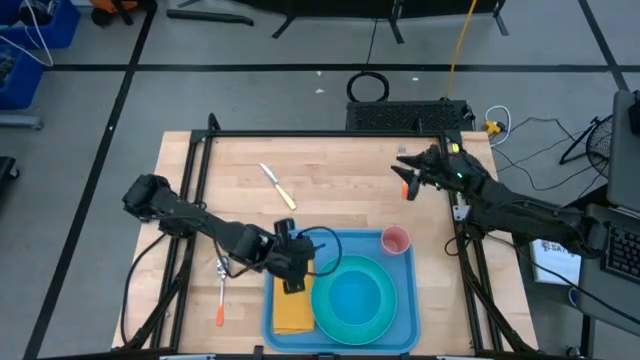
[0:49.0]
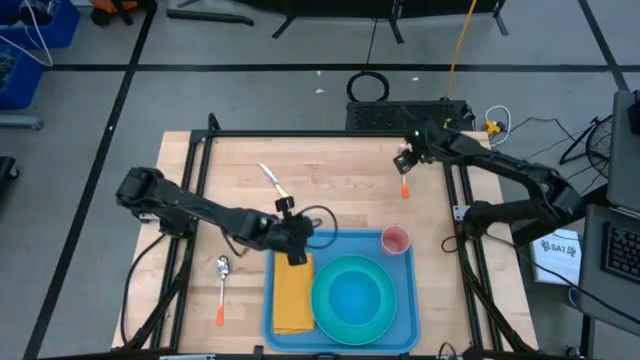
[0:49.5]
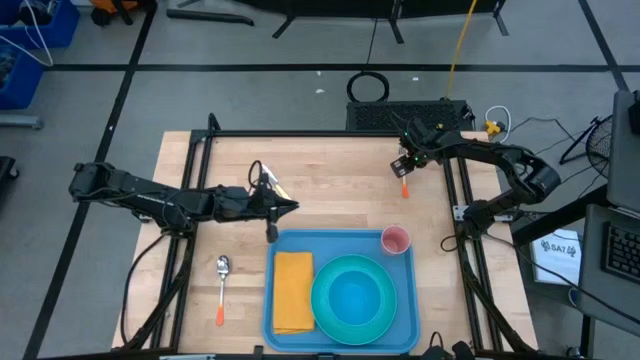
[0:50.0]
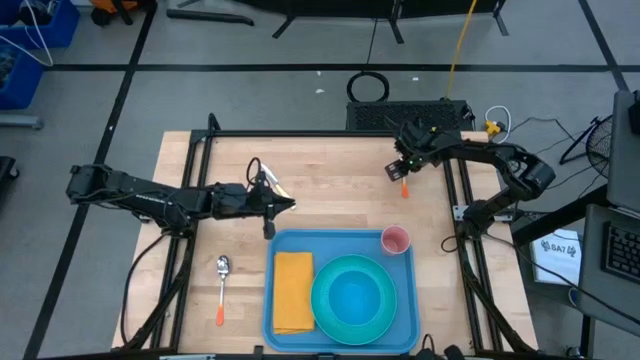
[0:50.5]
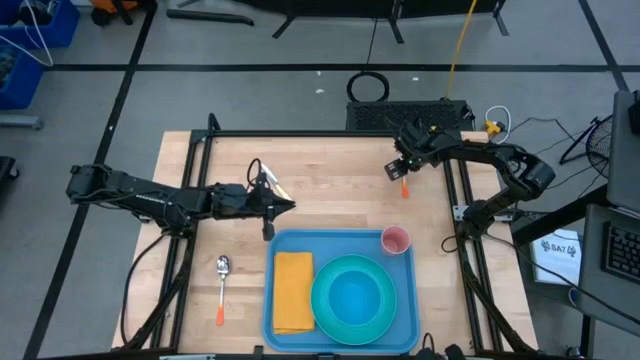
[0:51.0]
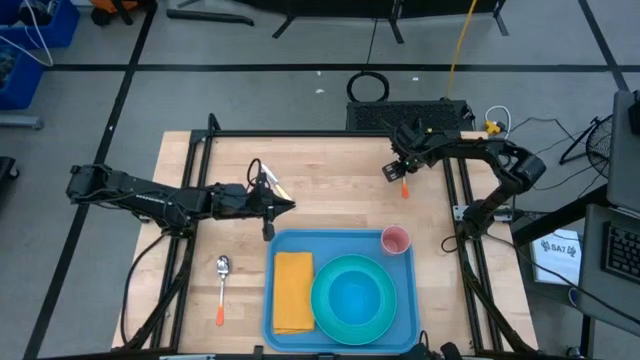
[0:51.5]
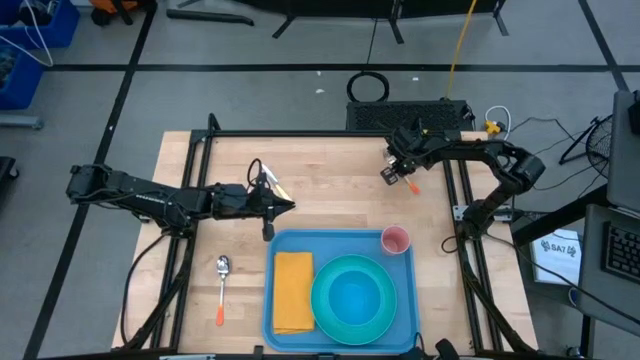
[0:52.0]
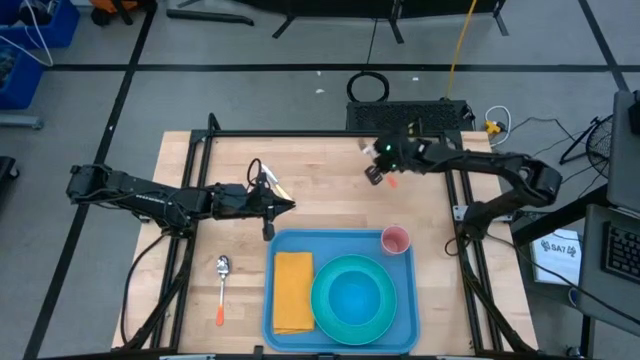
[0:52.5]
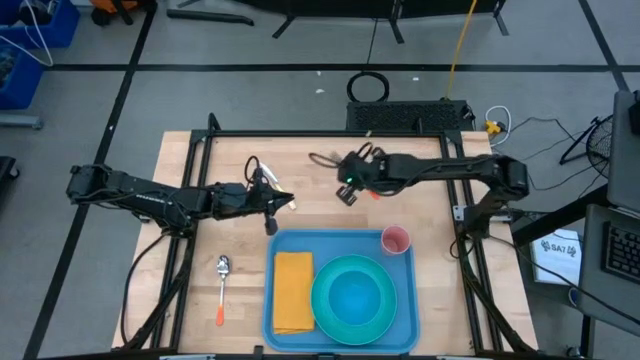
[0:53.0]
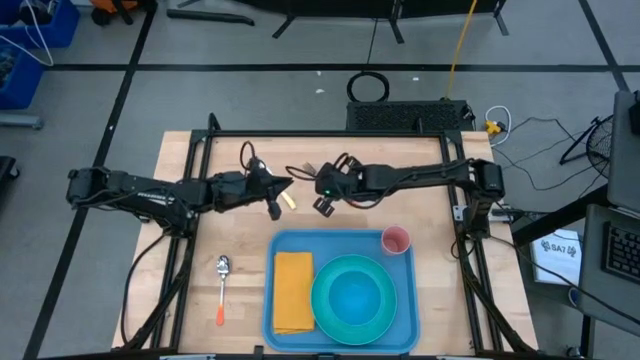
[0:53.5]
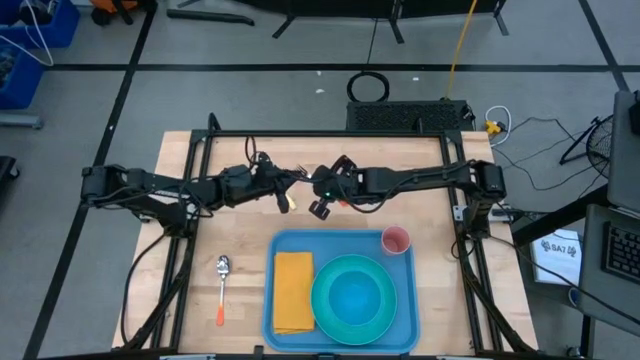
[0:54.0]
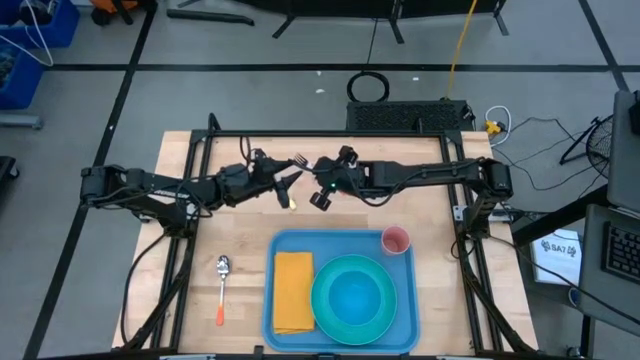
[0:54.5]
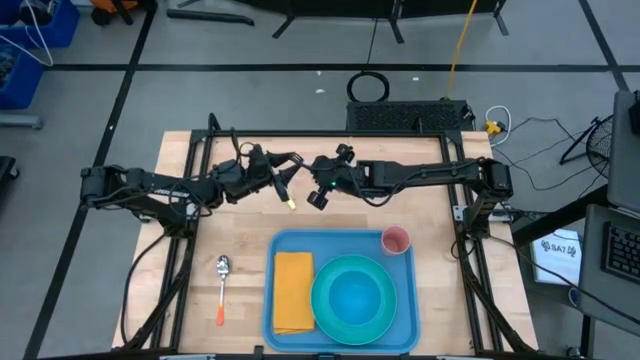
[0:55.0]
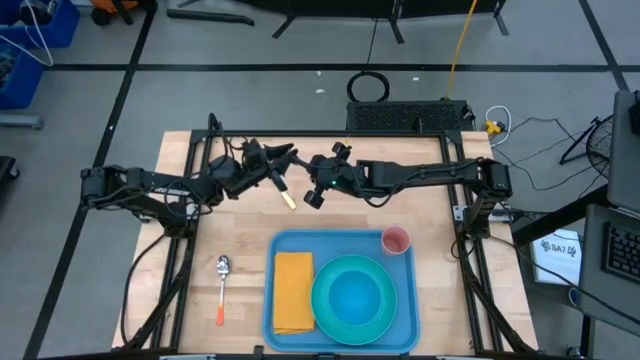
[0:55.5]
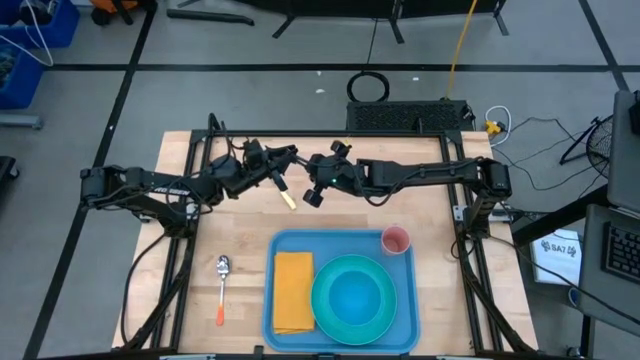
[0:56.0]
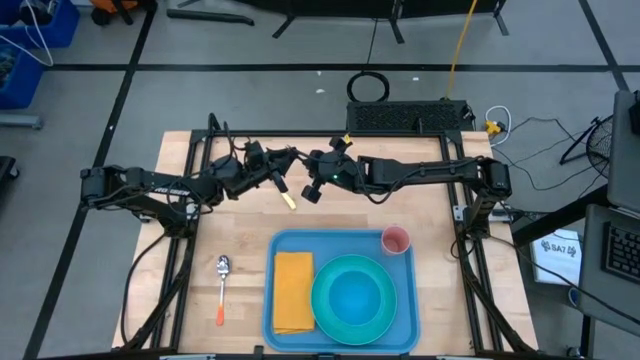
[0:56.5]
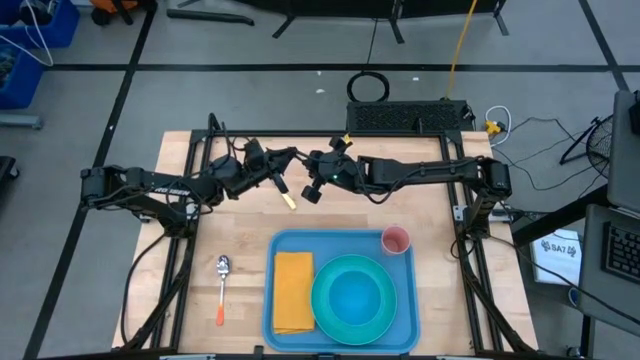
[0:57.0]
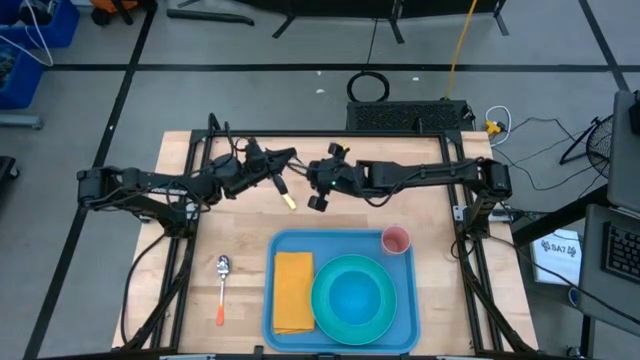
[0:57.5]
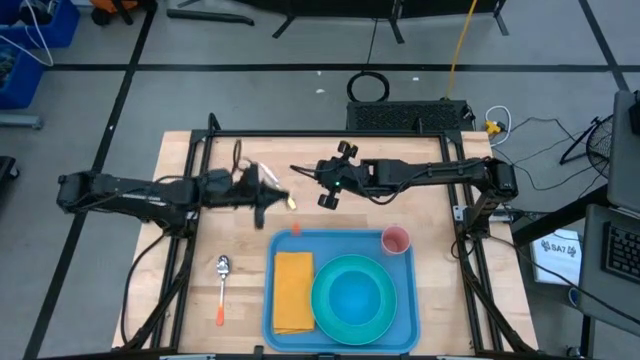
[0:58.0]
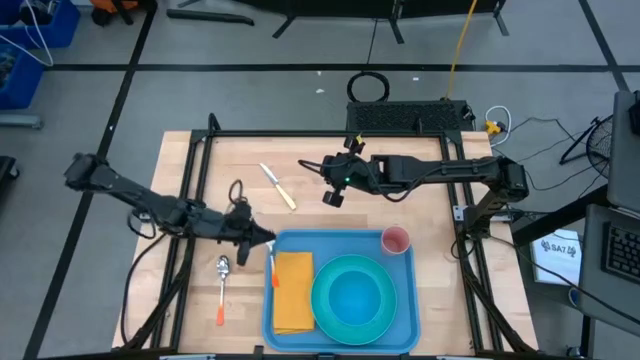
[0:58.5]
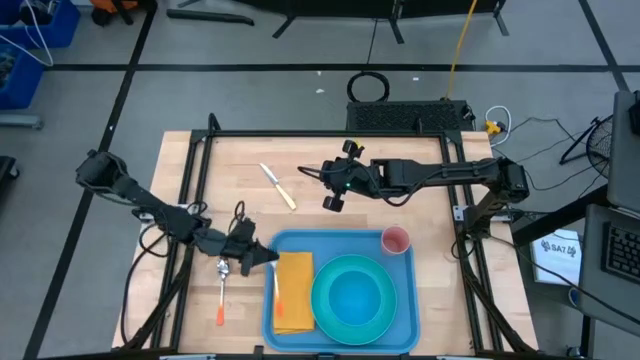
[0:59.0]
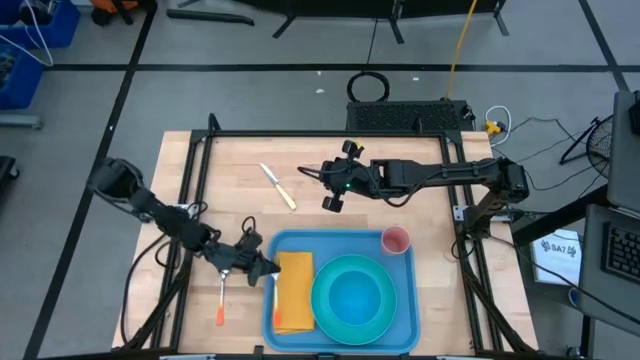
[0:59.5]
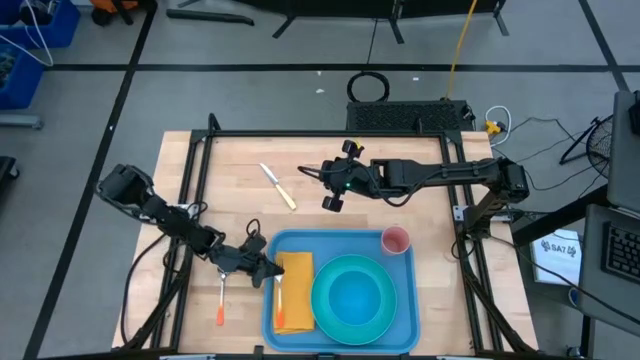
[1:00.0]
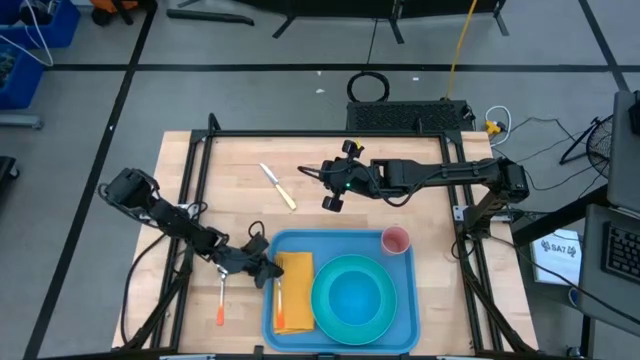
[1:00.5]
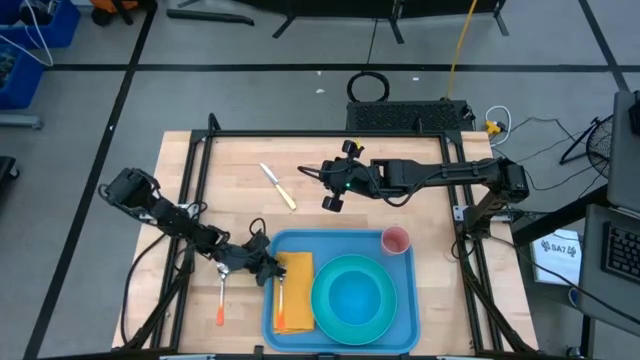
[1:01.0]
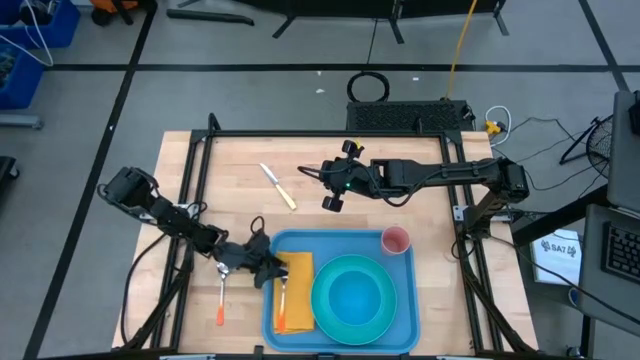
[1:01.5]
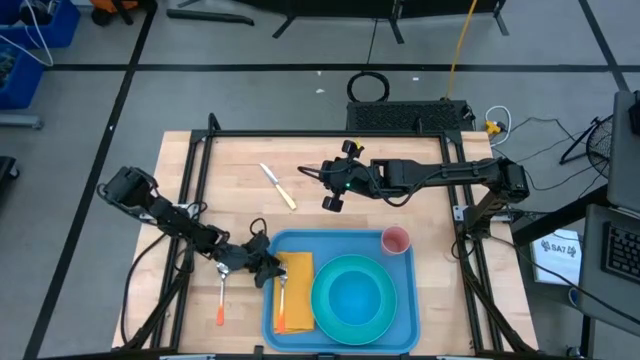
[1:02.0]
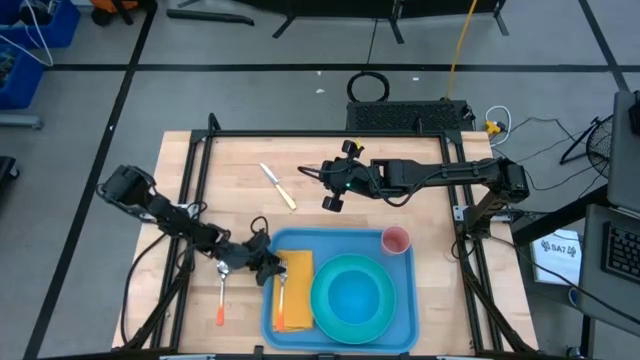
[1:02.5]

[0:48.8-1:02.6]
Task: Set up tray
Put the orange fork on top of the yellow table napkin

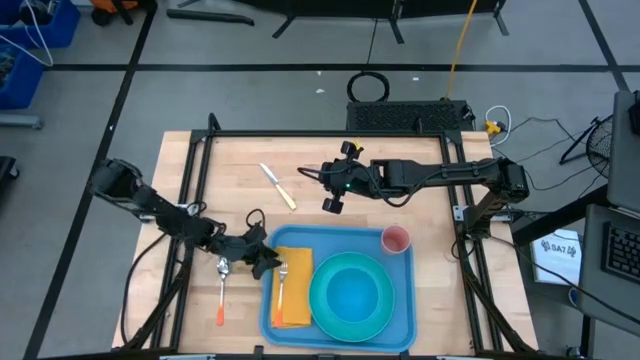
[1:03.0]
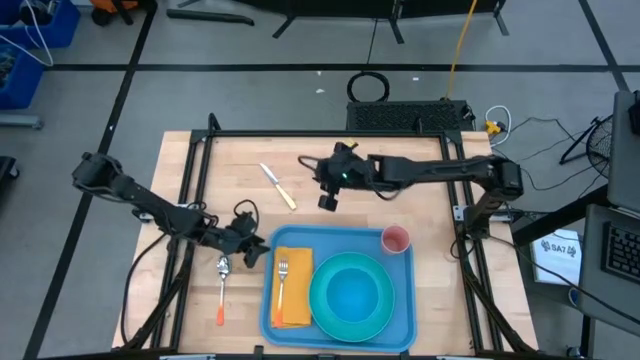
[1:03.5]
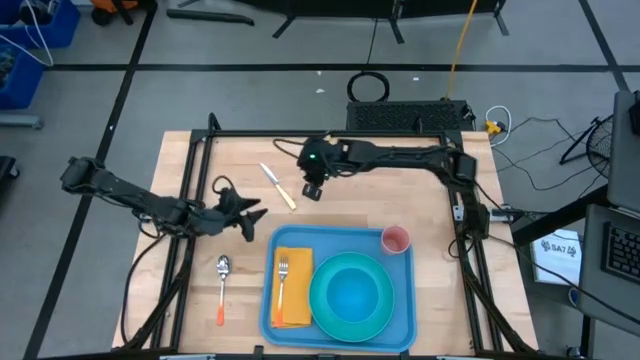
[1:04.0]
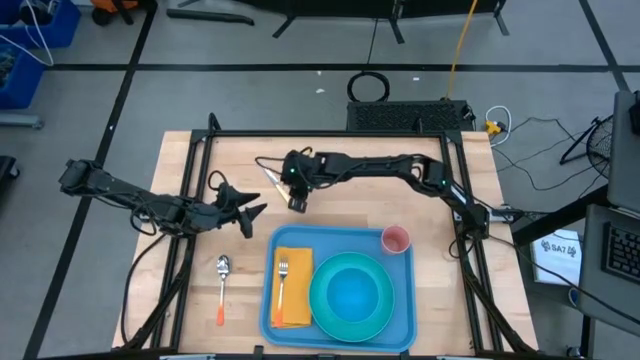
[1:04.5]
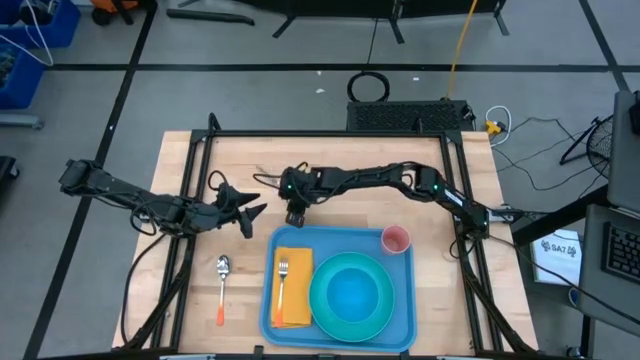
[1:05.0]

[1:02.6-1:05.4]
Put the yellow table knife on top of the yellow table napkin

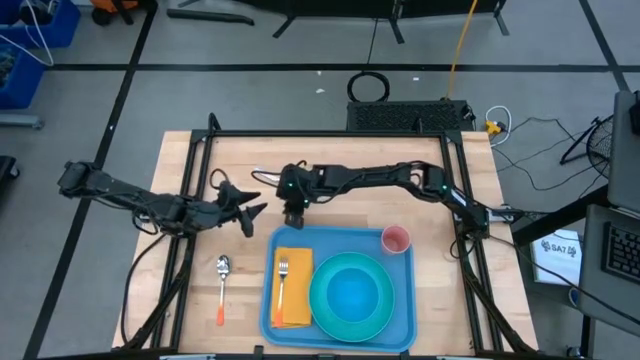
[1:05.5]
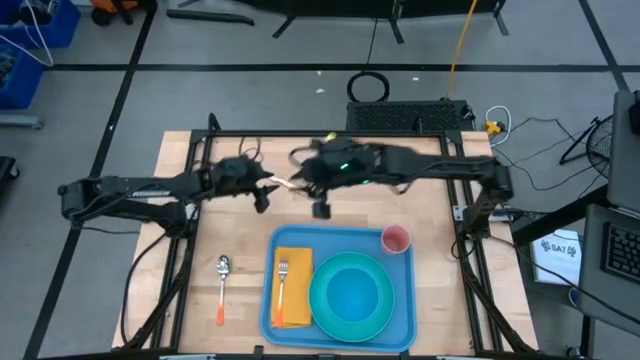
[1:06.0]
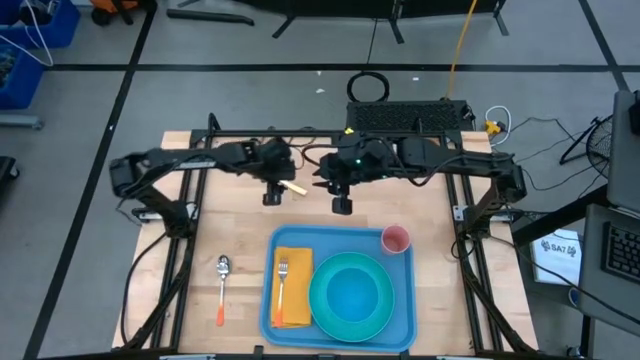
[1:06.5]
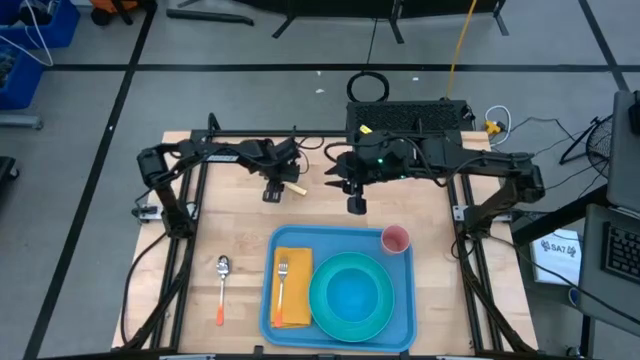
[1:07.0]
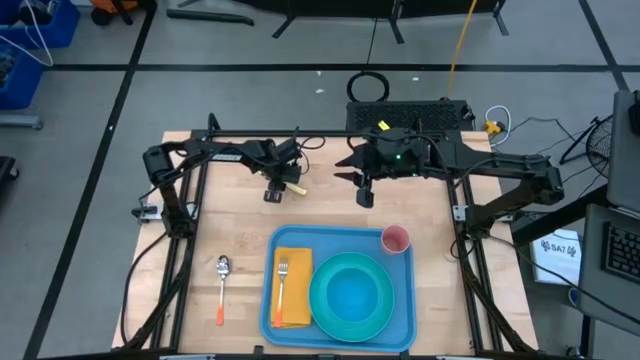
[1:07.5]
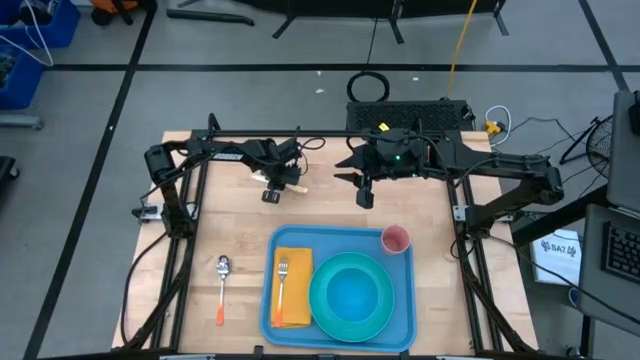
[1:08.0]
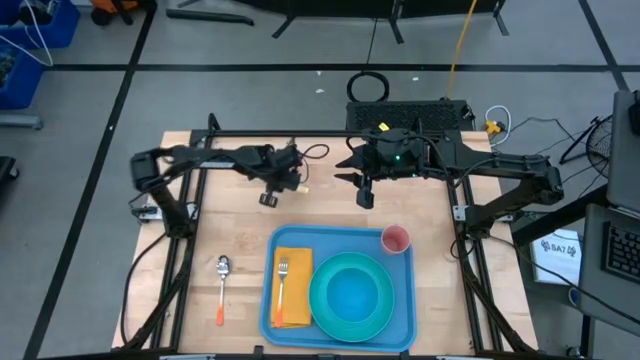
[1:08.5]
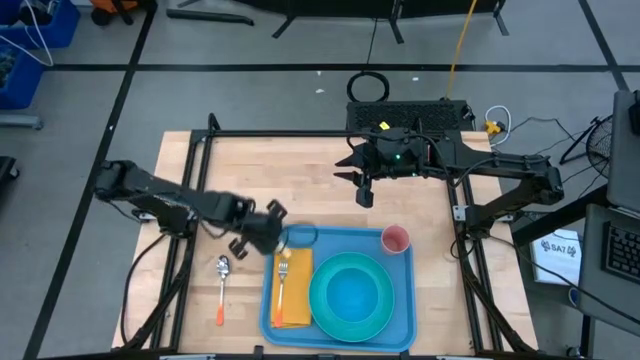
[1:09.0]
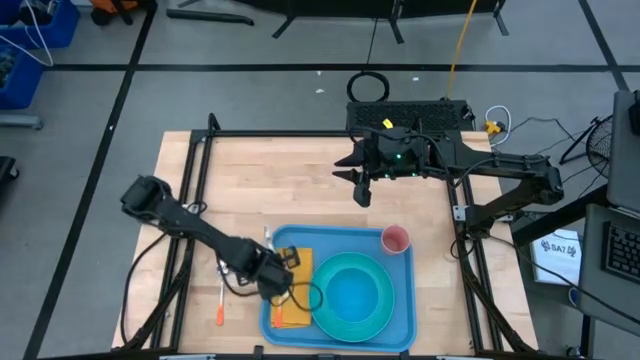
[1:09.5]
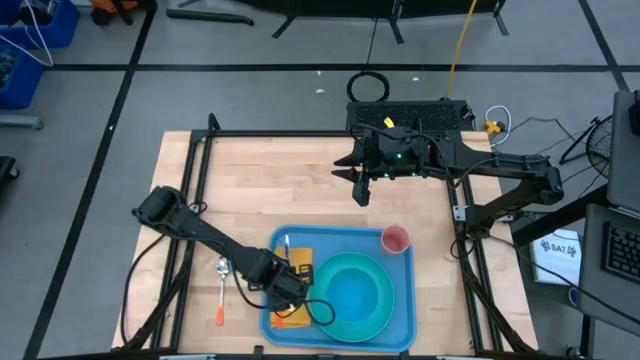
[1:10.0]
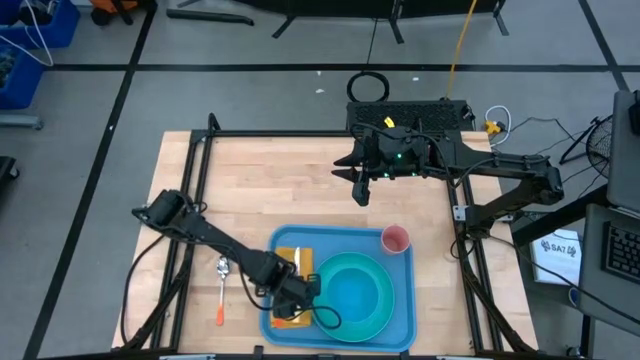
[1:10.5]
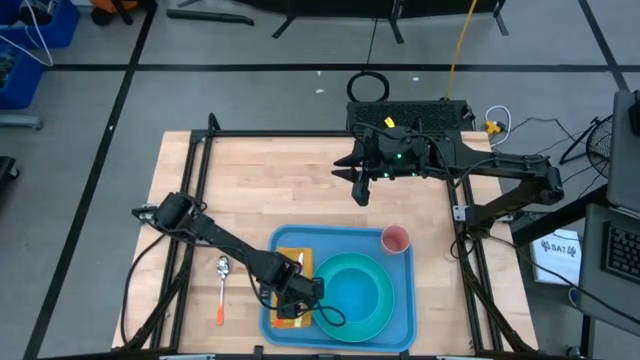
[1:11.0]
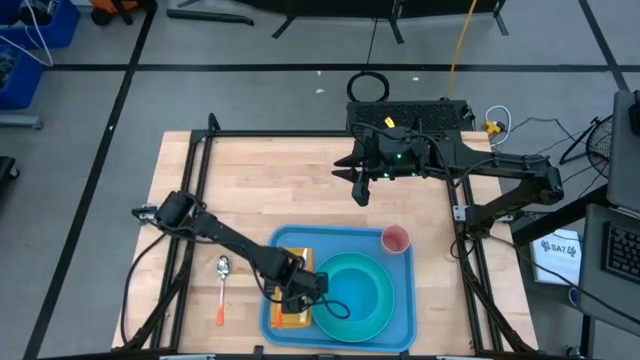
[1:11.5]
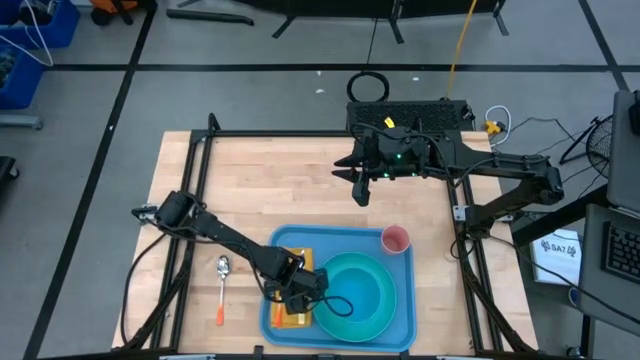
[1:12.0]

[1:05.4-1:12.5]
Put the yellow table knife on top of the yellow table napkin
